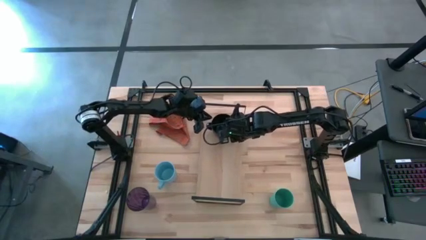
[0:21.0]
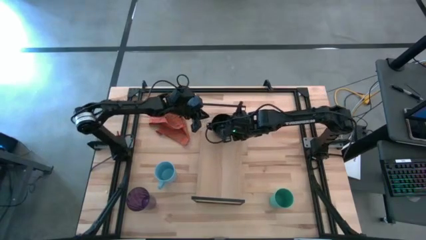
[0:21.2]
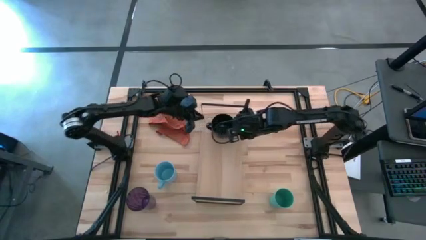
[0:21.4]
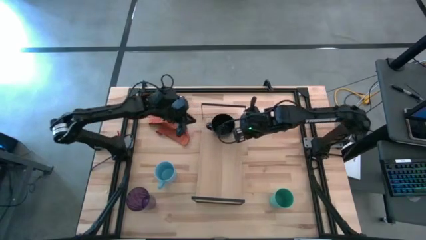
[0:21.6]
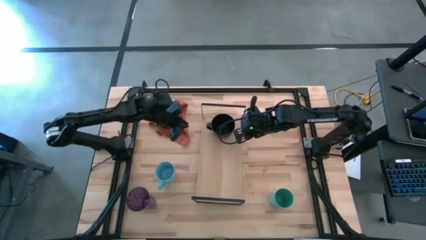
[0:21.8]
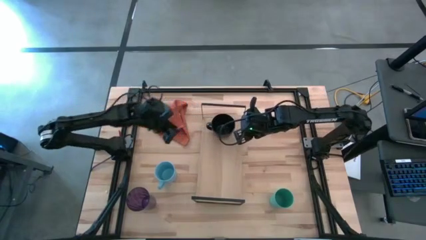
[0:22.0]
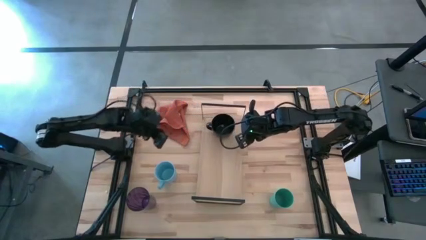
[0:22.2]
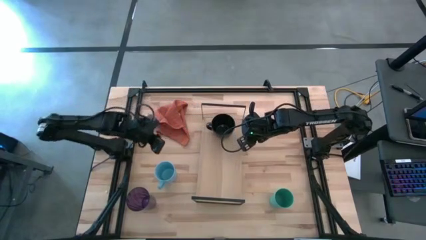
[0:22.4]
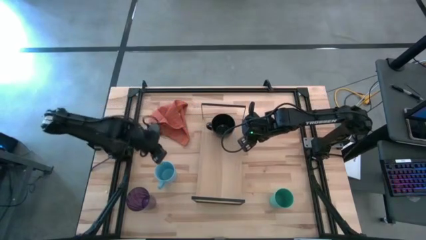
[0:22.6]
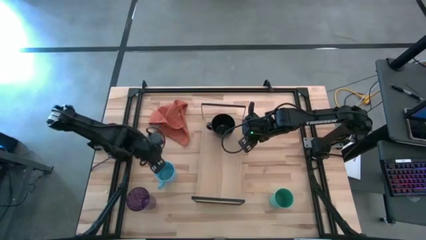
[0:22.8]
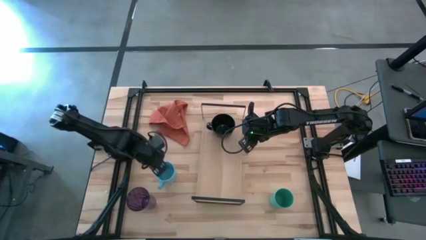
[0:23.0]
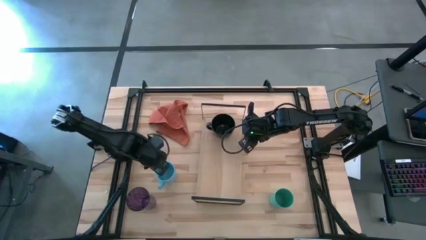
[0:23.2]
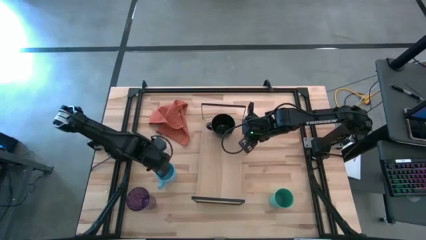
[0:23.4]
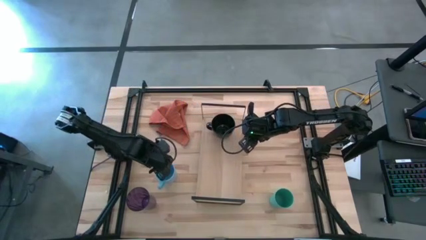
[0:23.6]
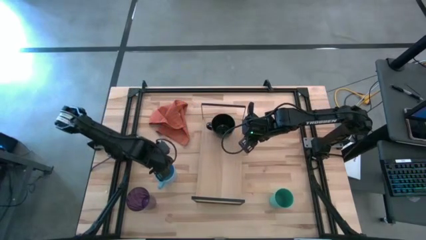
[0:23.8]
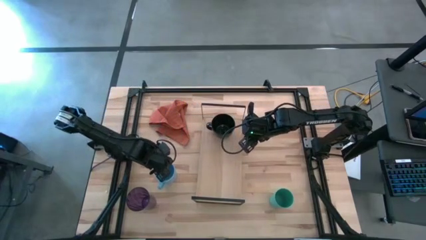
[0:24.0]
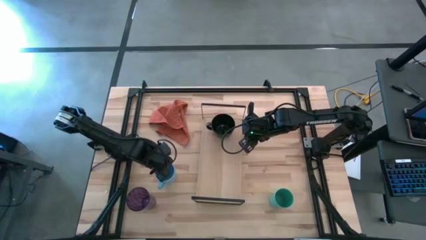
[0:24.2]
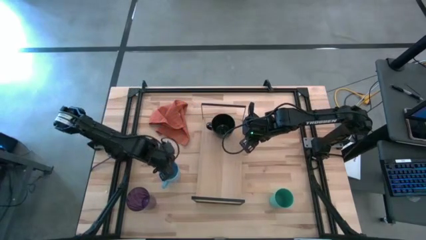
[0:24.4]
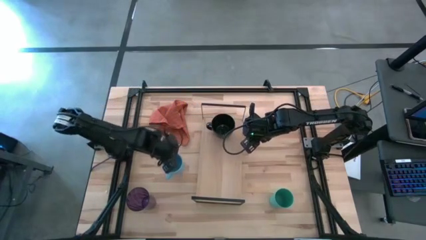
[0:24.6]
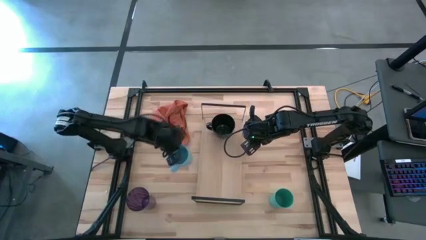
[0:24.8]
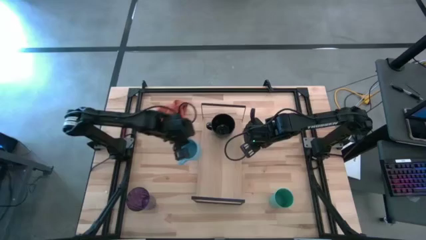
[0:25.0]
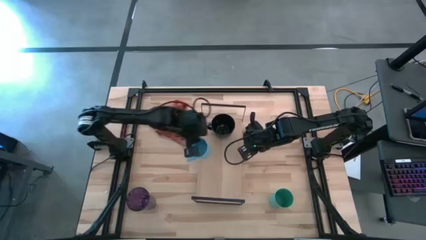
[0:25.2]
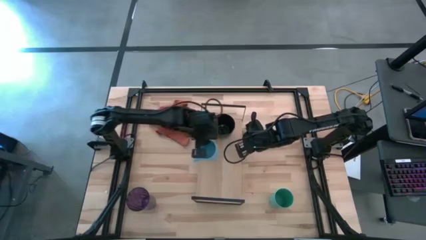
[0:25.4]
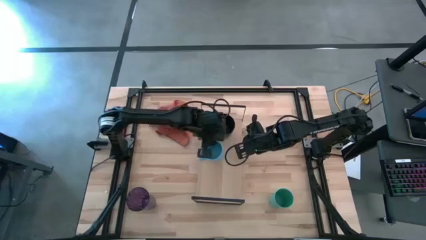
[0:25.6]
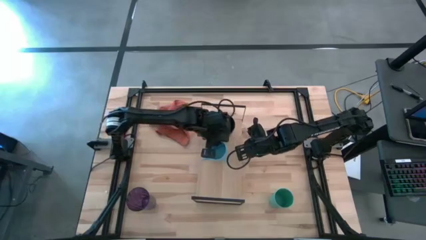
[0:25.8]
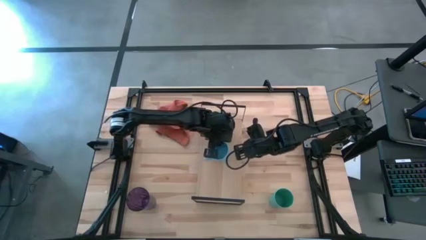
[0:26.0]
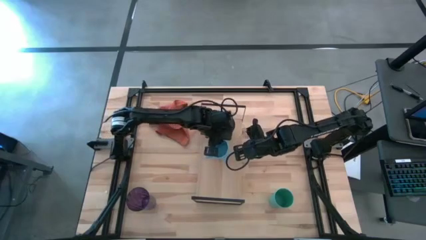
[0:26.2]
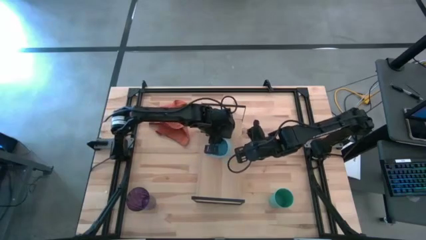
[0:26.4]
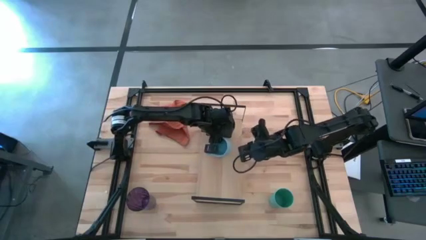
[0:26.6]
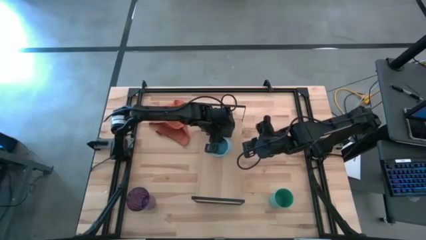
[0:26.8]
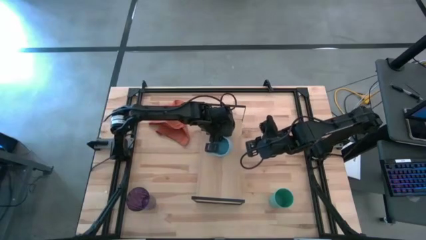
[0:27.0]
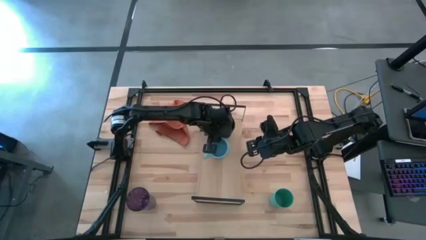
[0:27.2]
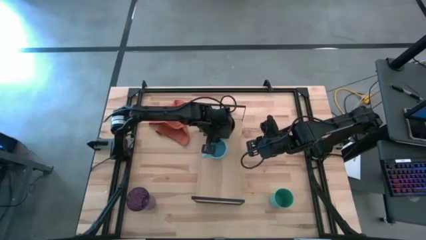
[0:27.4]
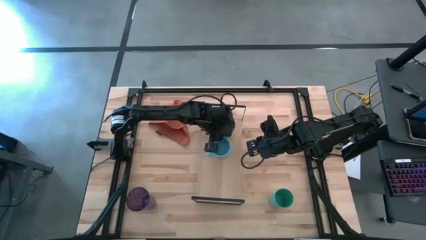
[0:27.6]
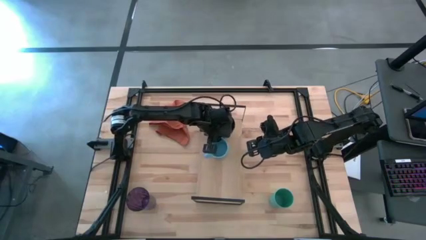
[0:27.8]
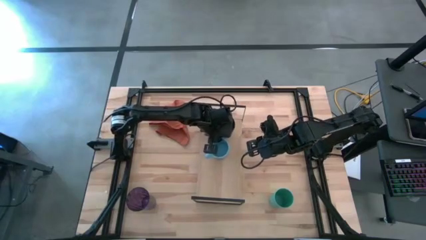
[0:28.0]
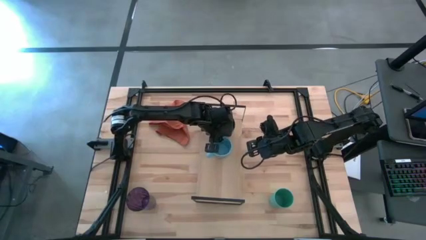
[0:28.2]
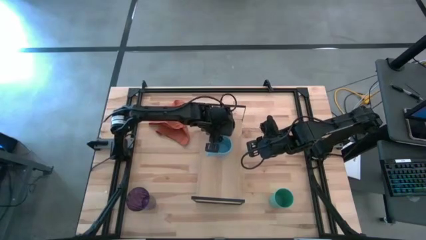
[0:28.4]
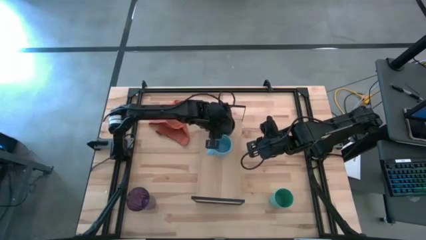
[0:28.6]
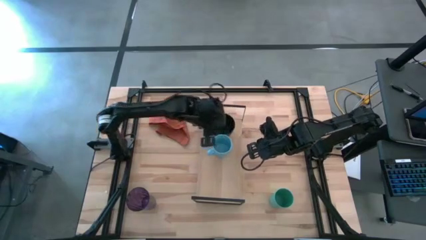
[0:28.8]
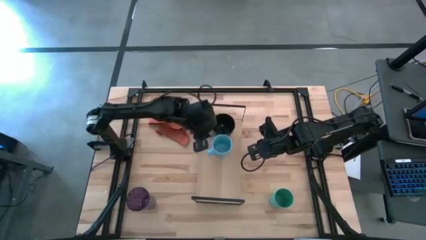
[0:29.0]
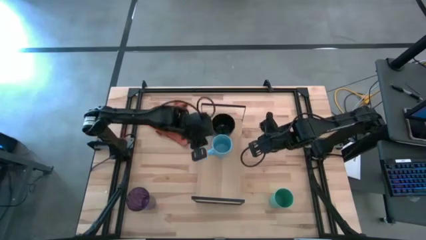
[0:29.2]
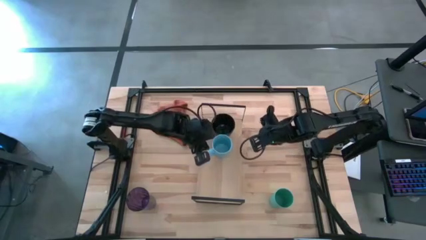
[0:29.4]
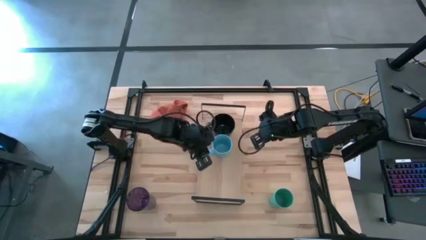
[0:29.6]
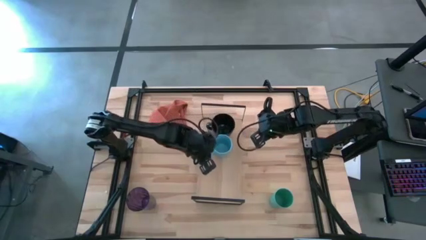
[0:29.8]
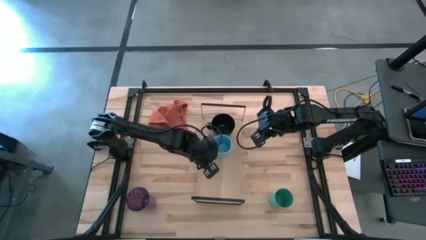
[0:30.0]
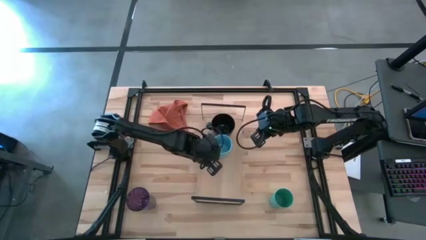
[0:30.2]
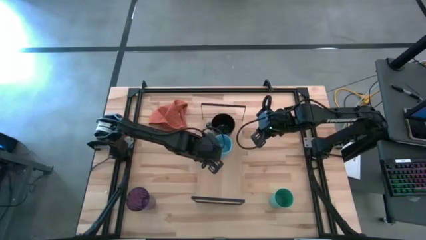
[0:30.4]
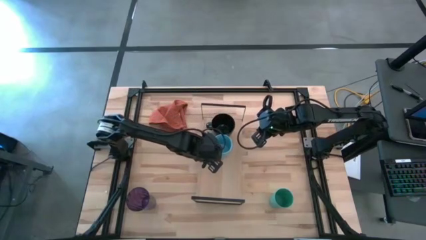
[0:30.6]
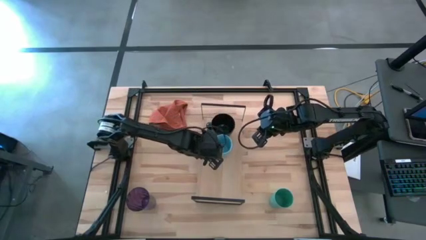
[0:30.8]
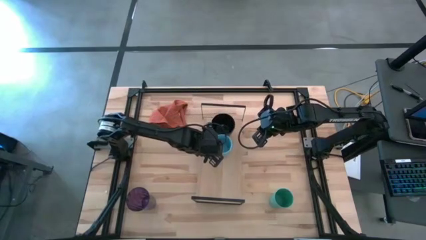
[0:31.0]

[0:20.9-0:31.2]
Task: Stack small to large cups/mugs on shelf
Put the blue mug on the shelf

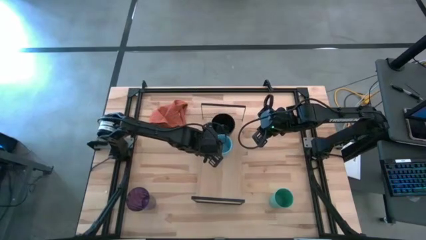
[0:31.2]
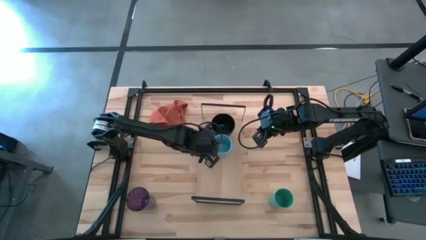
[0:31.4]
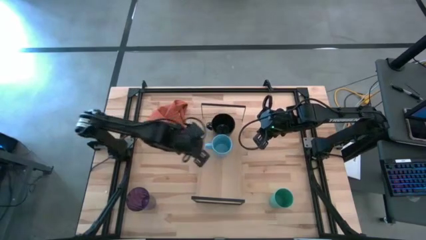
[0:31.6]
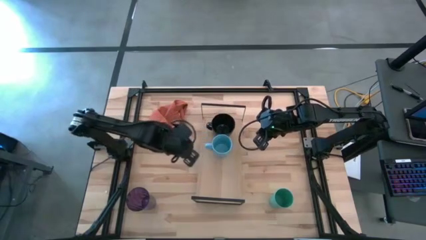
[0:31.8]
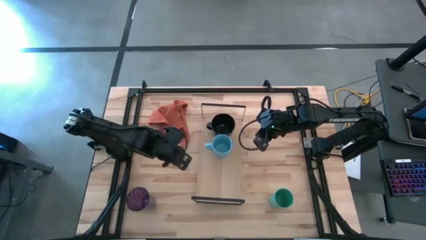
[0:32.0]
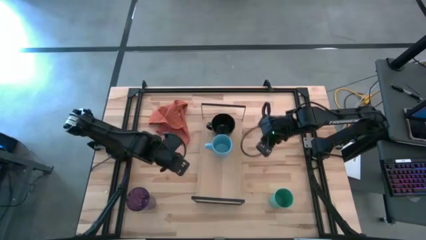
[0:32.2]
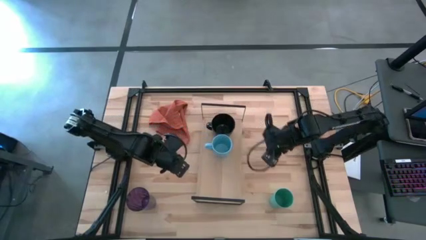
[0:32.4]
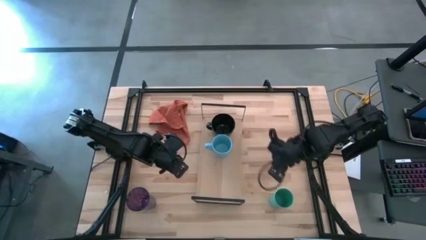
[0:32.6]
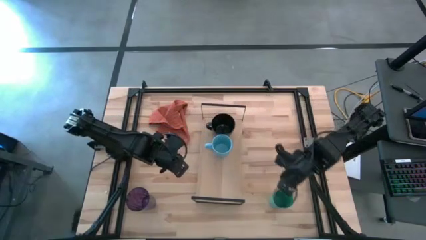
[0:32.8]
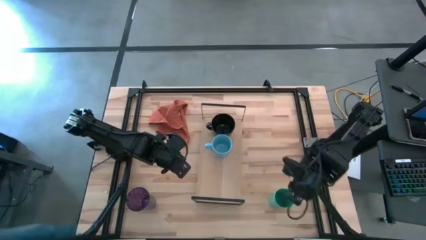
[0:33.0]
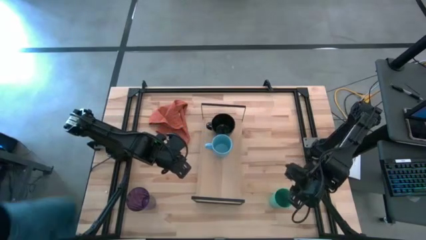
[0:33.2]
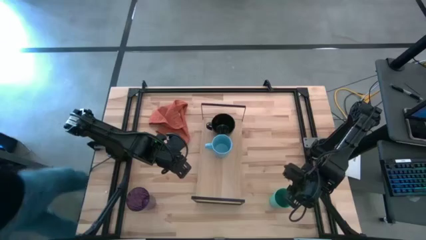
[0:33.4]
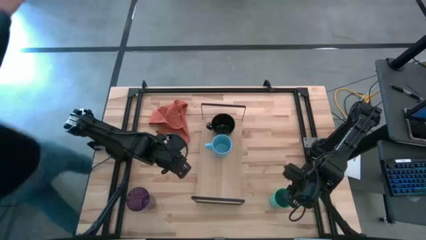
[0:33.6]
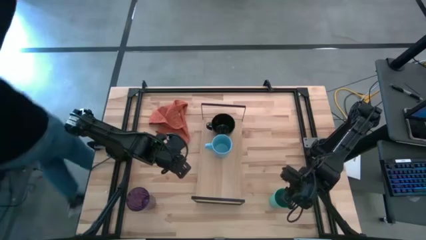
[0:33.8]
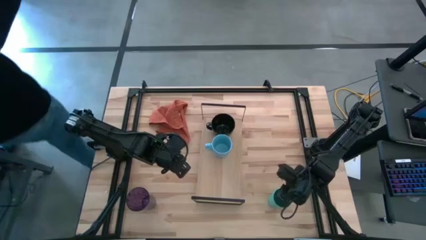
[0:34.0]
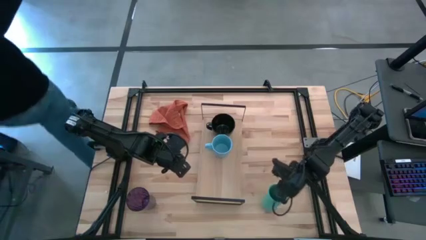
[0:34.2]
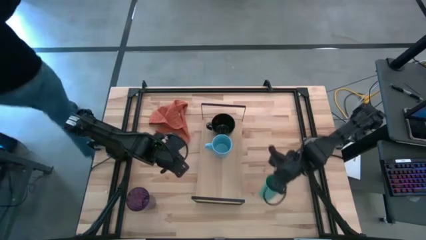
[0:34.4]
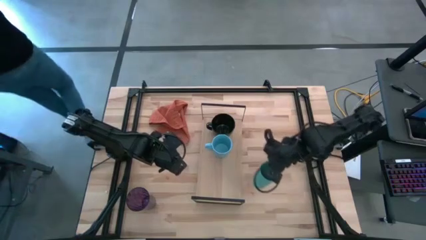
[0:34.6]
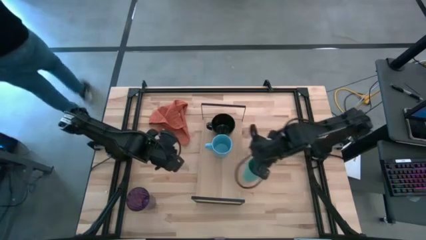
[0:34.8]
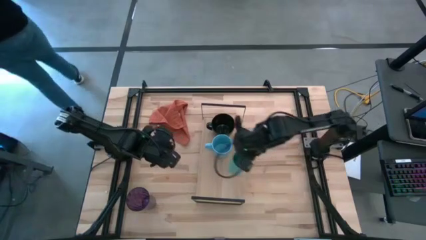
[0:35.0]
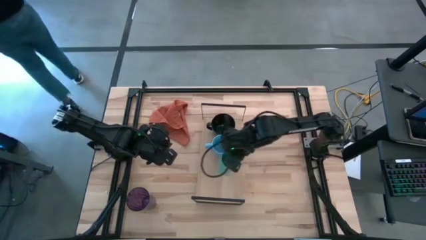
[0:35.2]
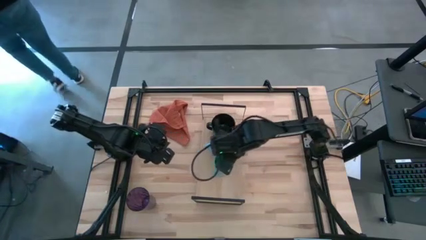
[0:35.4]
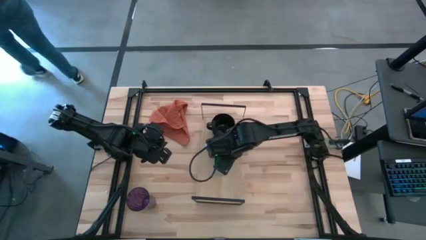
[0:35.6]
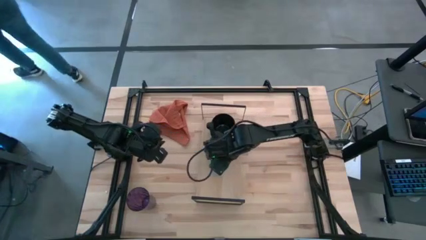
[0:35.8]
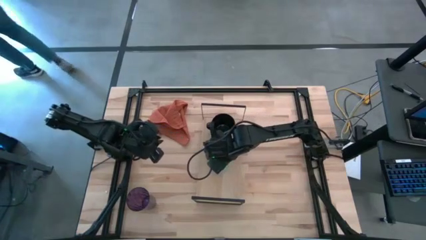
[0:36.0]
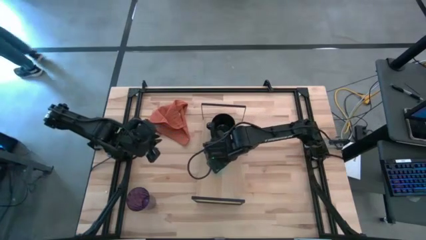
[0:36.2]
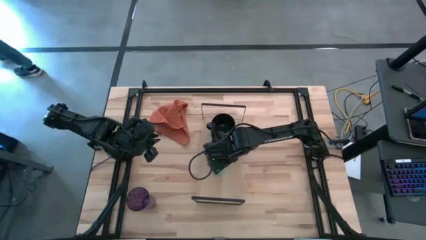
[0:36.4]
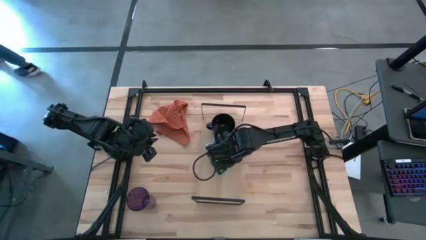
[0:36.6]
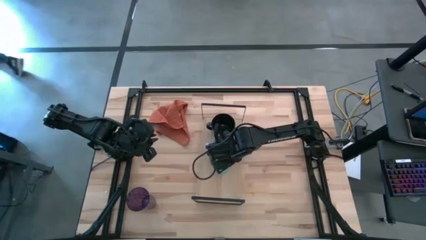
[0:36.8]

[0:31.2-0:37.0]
Put the green cup on the shelf

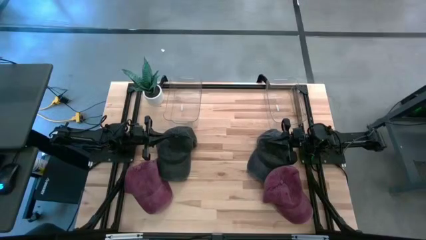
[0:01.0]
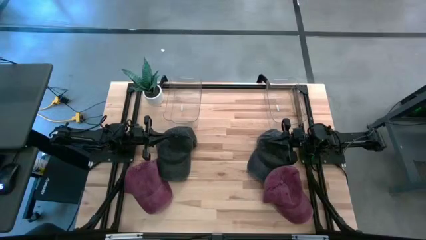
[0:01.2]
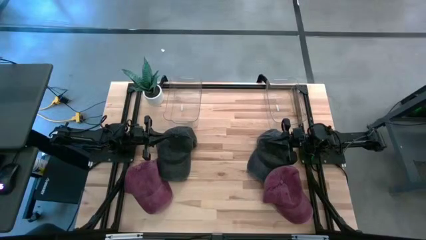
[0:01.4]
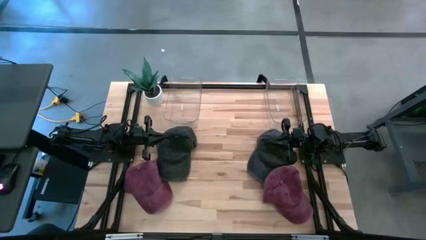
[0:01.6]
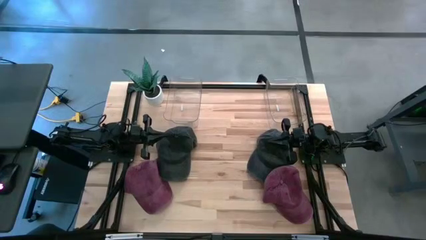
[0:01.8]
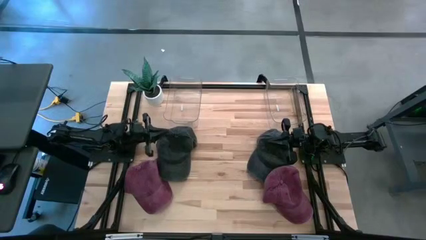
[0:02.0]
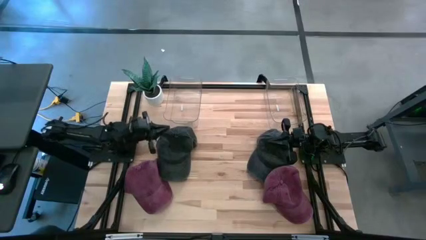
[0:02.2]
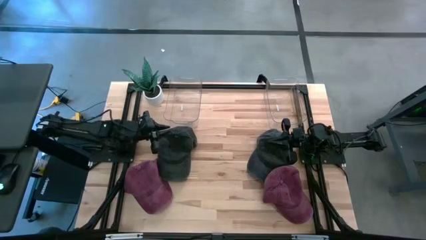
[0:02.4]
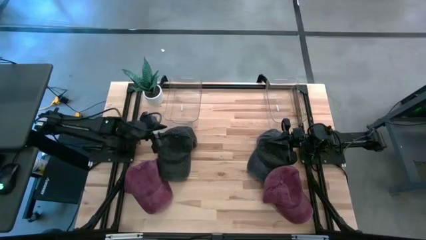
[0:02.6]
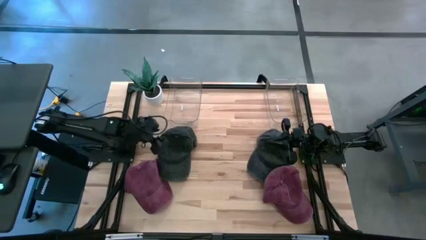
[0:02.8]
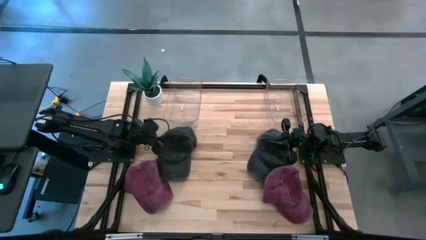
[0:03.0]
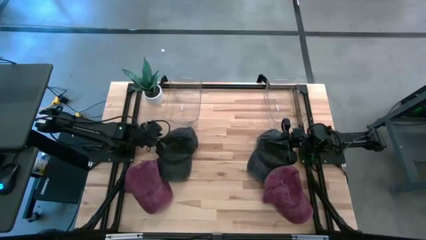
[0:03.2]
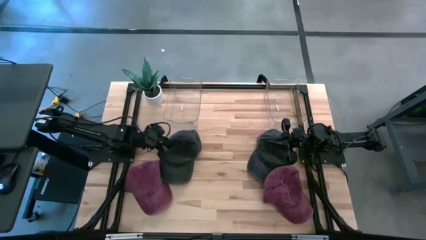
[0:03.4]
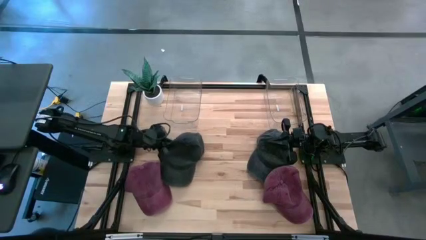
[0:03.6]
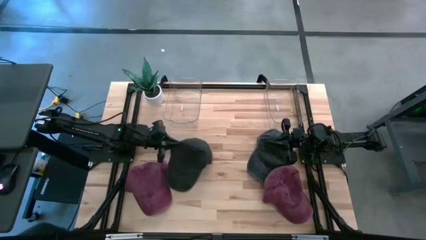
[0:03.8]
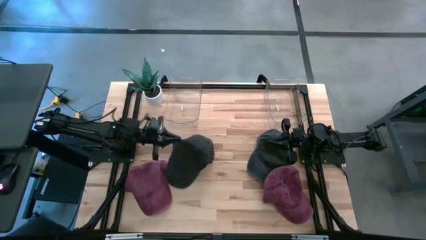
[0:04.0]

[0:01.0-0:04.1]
Task: Pick & Place hat
Put the left black cap into the left transparent bin
